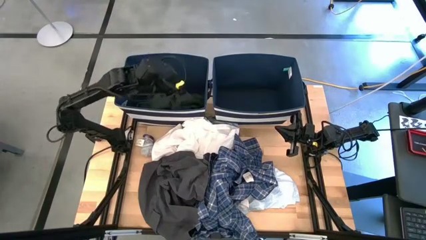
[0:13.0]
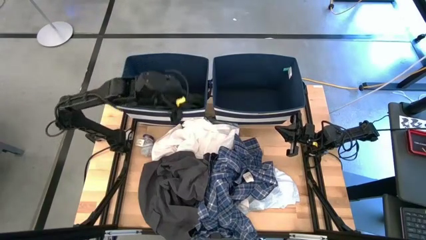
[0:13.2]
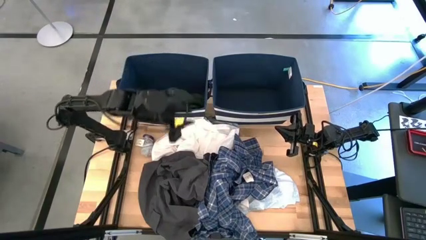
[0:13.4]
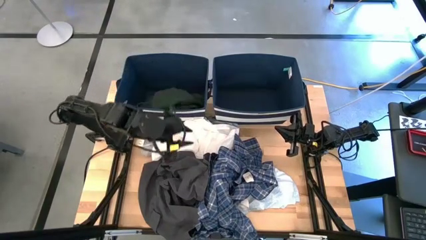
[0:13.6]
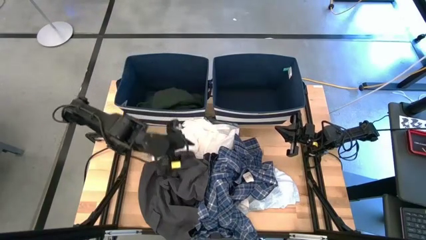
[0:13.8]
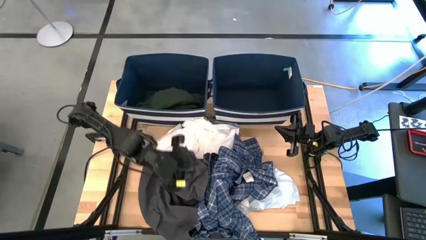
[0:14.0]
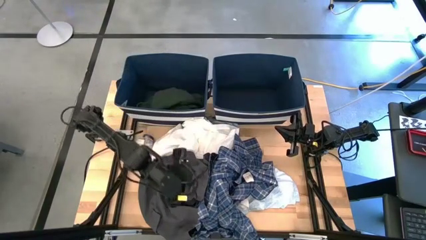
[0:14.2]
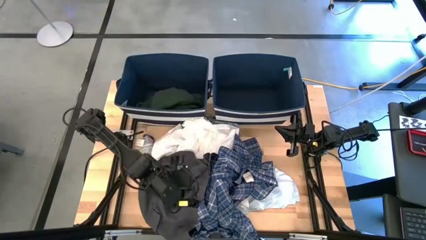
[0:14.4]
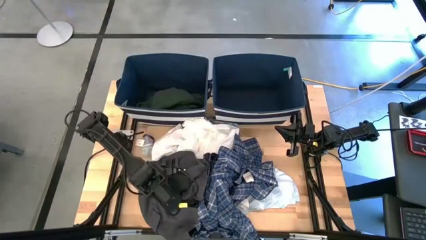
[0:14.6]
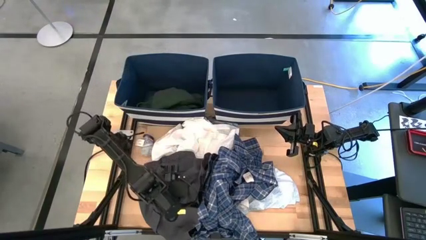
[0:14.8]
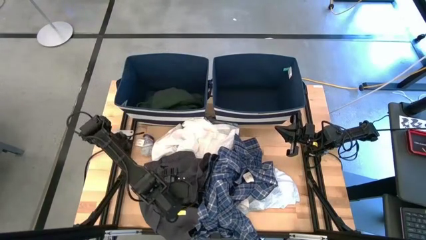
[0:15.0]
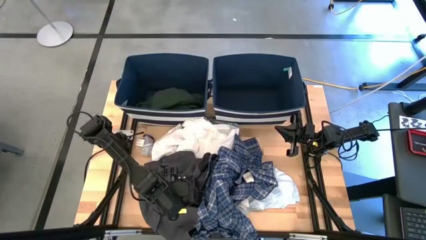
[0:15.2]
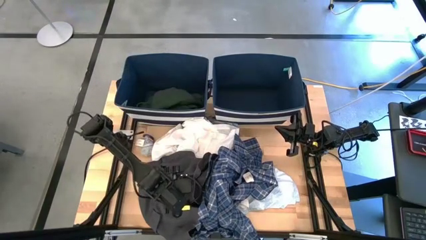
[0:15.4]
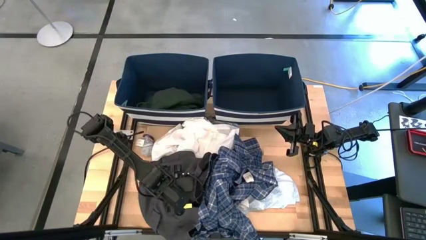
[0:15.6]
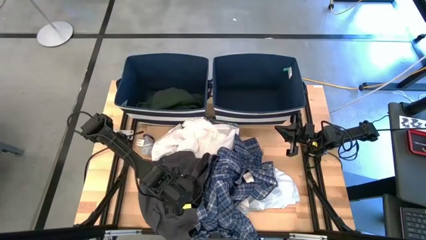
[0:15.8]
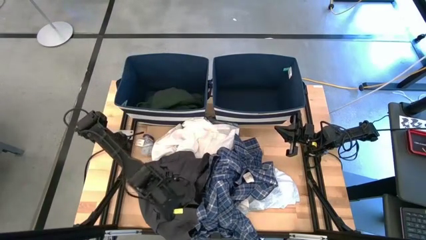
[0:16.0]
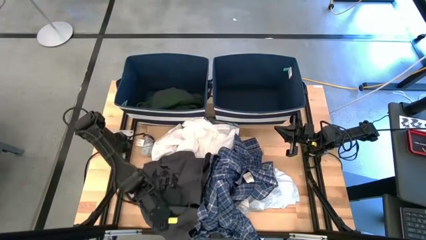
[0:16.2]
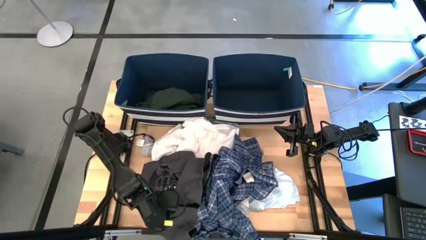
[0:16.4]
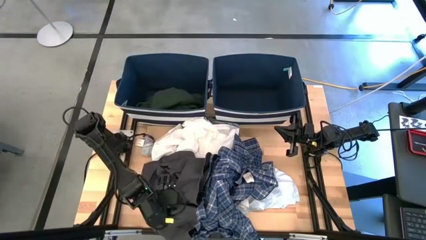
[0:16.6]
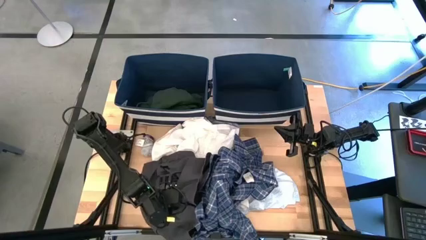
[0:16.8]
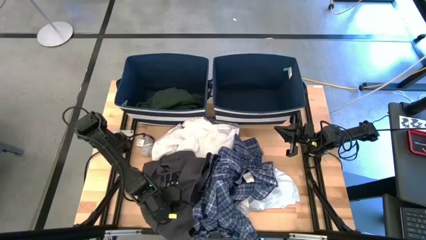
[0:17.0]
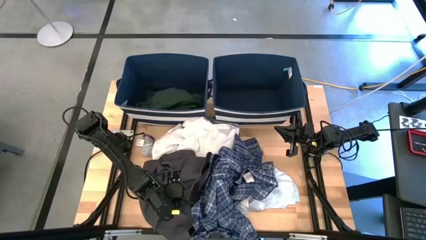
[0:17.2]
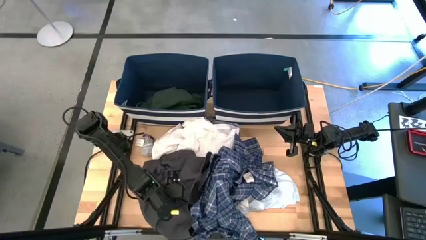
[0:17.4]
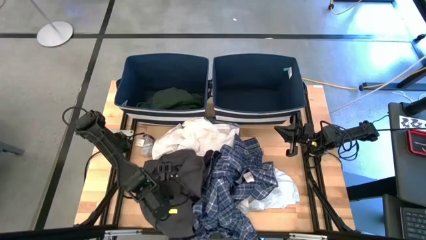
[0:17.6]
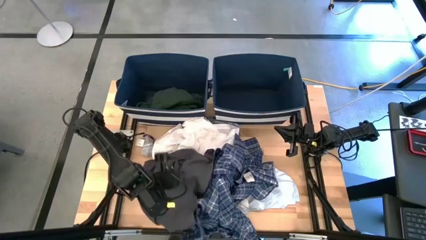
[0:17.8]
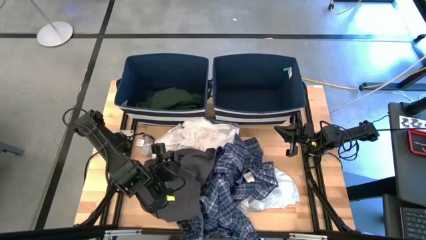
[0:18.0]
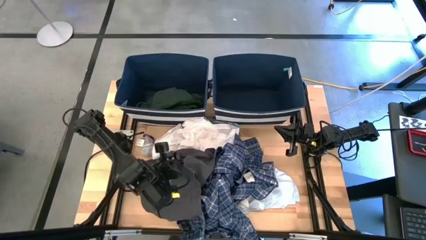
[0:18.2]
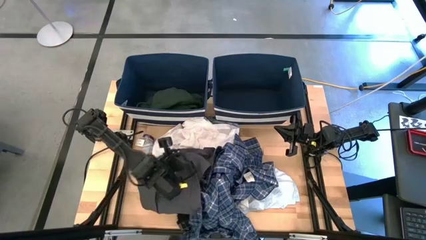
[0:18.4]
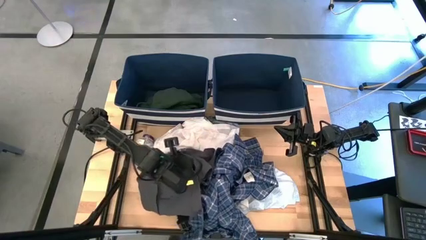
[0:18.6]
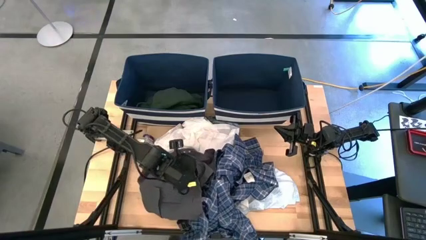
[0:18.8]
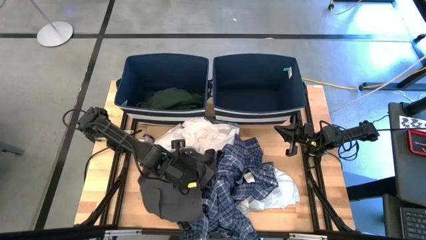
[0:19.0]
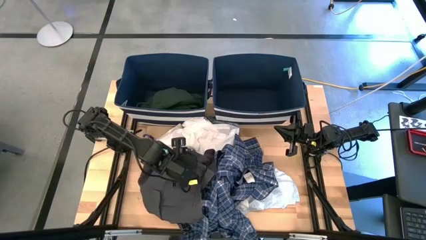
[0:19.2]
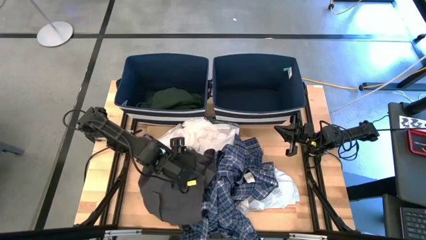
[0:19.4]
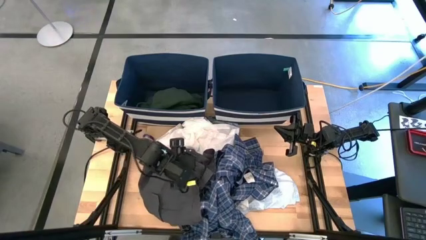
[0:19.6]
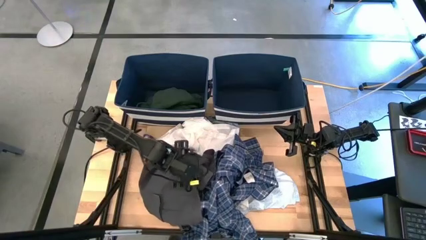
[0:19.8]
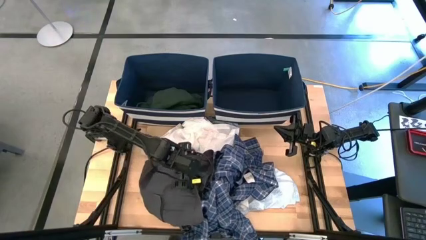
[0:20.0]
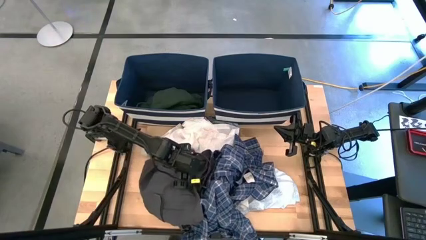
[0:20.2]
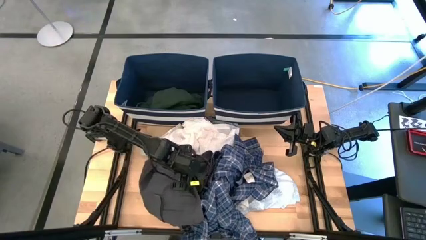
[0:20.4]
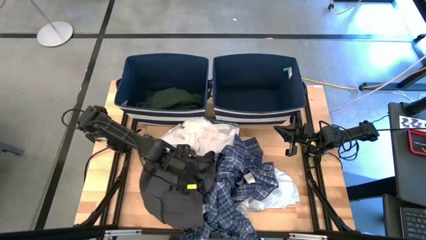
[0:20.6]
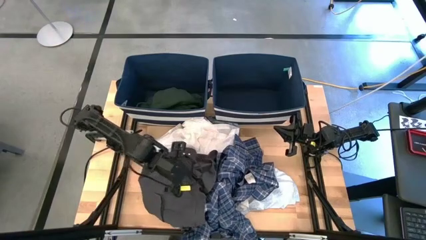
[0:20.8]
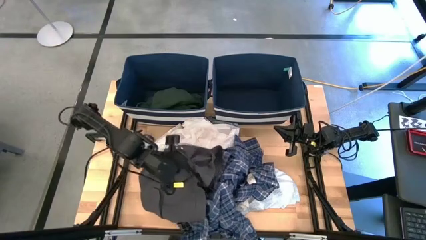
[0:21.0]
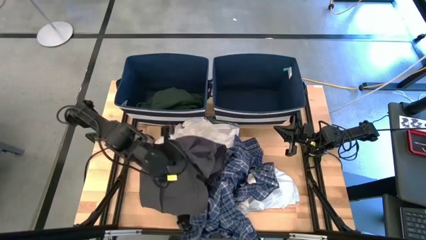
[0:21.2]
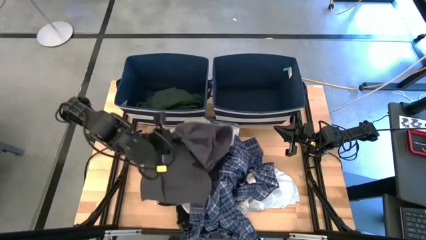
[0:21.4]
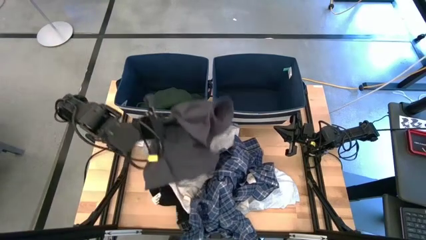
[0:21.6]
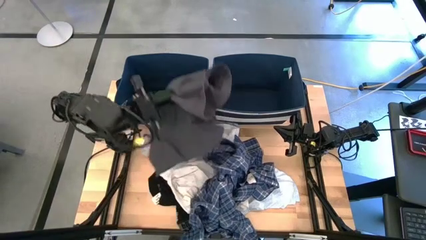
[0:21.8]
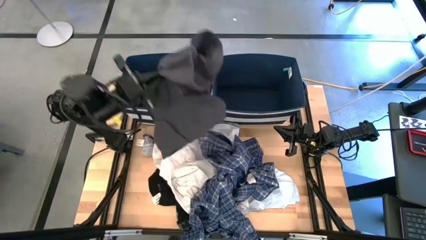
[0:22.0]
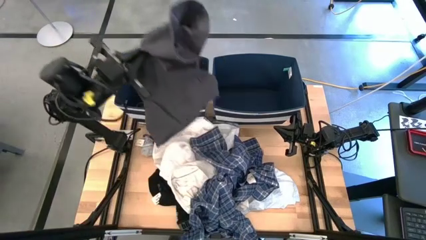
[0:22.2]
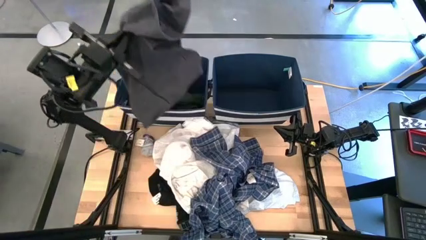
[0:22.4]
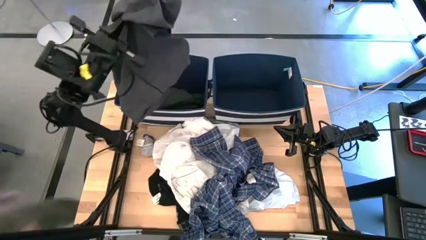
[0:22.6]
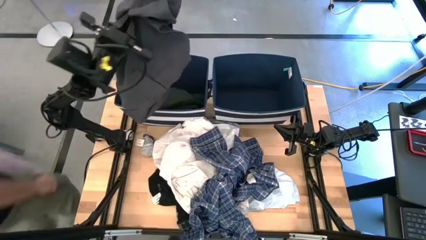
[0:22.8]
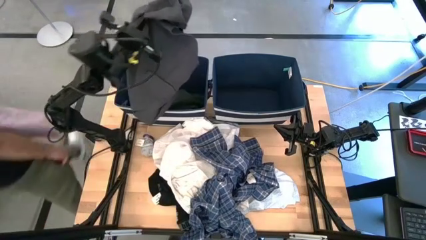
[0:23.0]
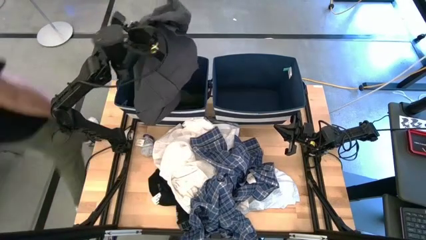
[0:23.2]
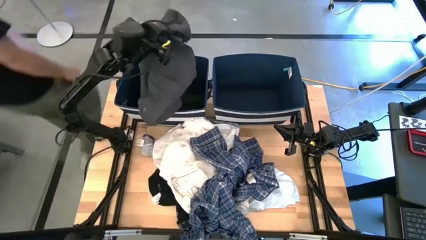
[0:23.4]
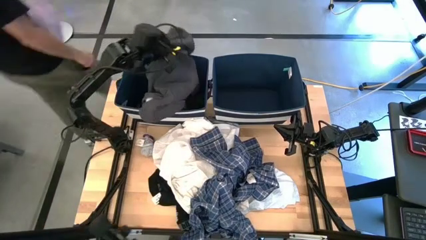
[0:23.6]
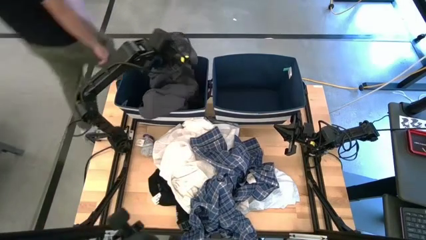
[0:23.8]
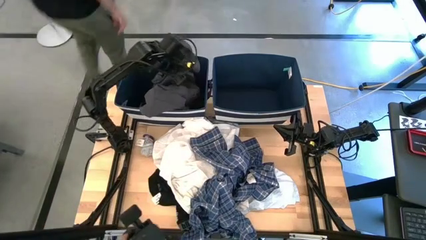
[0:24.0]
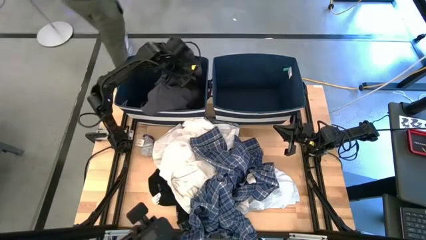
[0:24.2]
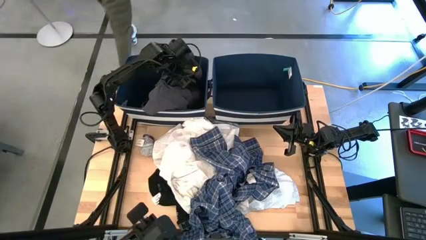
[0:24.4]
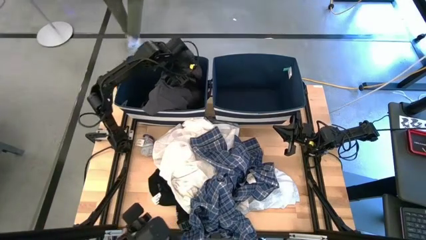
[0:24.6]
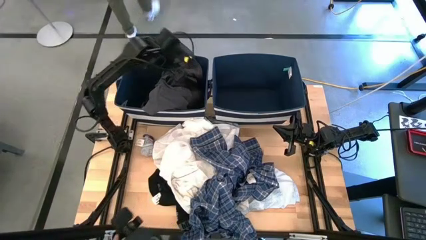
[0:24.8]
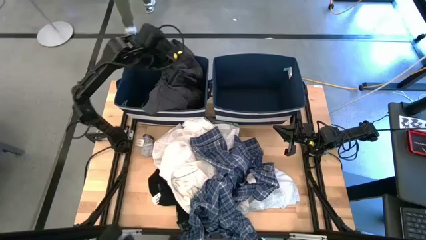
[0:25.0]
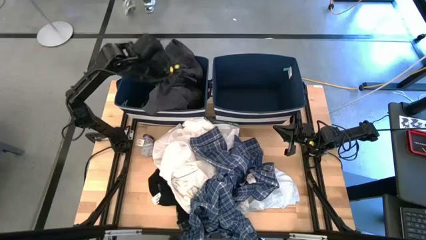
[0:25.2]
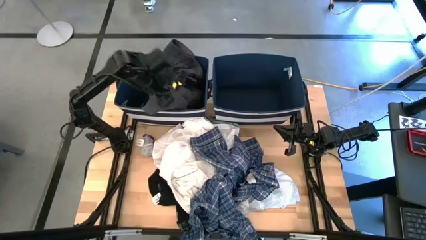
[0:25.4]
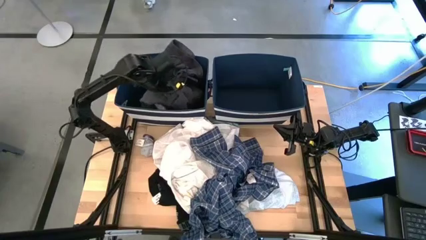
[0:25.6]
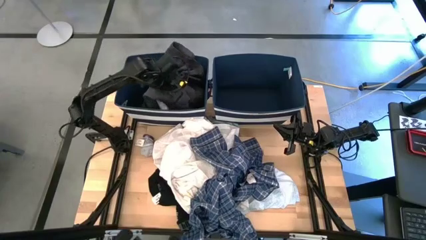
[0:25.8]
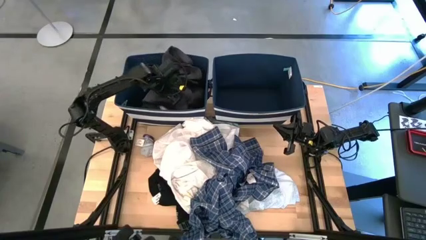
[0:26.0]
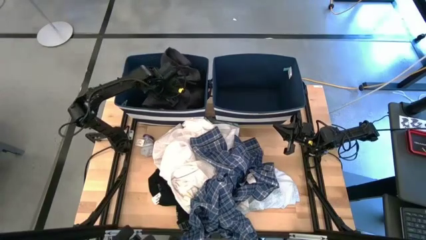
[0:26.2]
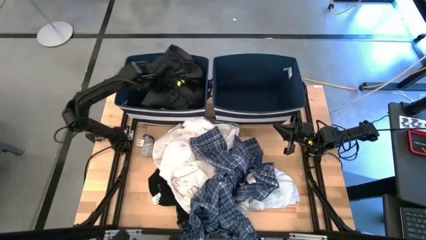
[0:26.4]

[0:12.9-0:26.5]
Task: Sort clothes
Put the black shorts into the left blue laundry bin
